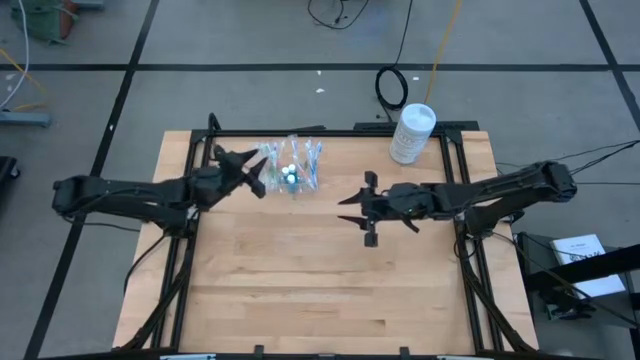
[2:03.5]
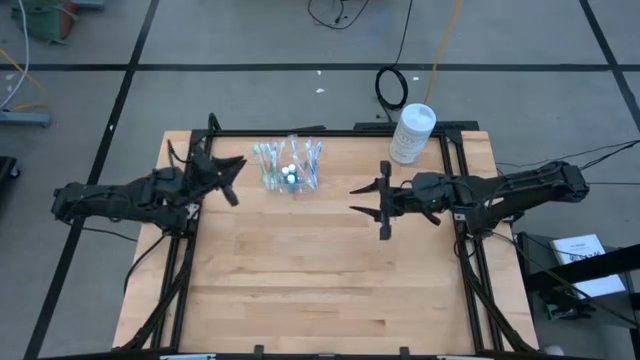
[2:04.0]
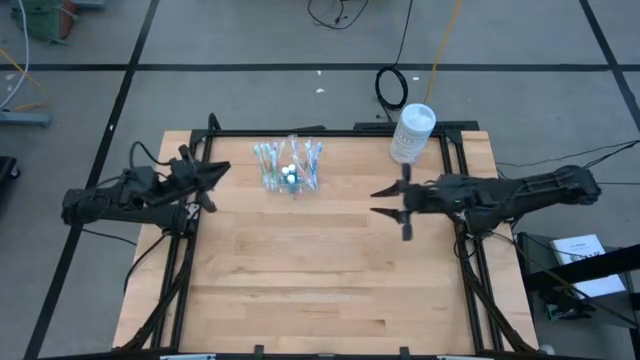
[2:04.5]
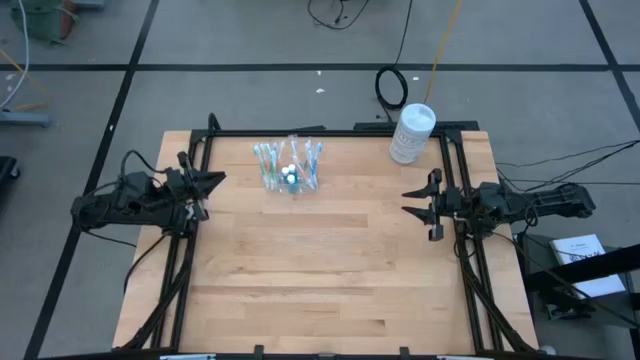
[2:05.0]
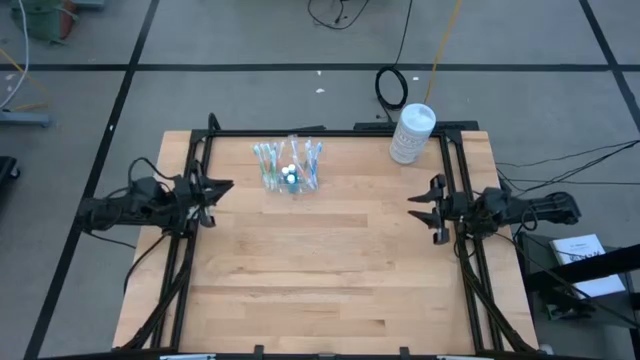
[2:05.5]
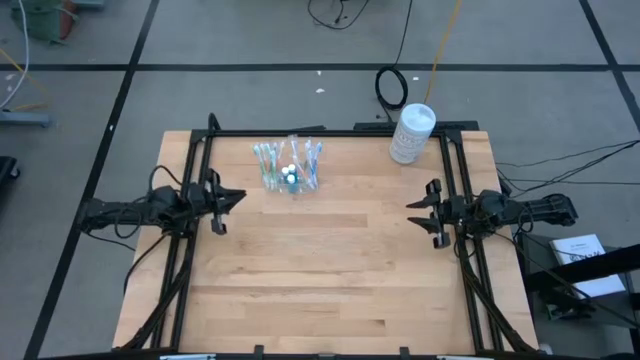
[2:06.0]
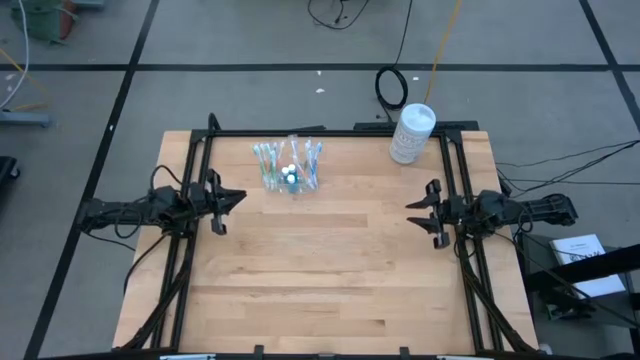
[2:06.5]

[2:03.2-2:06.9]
Task: Pick & Place toothbrushing station
Return to Home Position

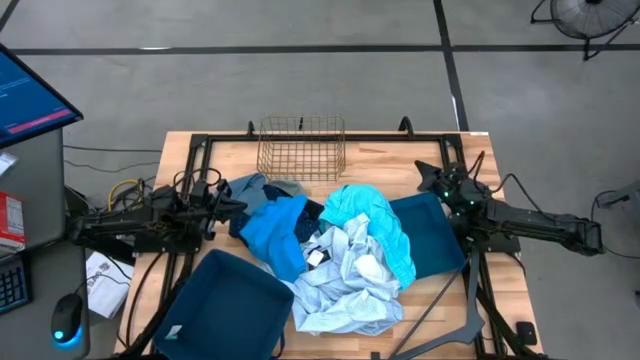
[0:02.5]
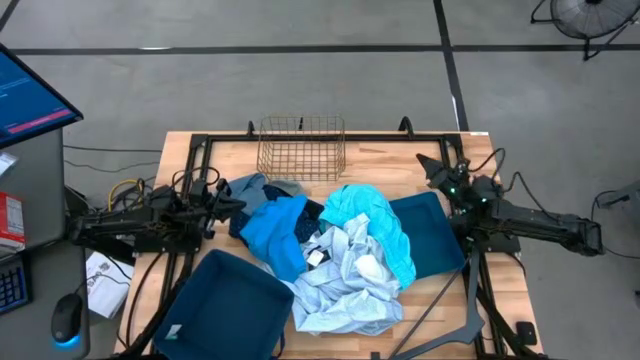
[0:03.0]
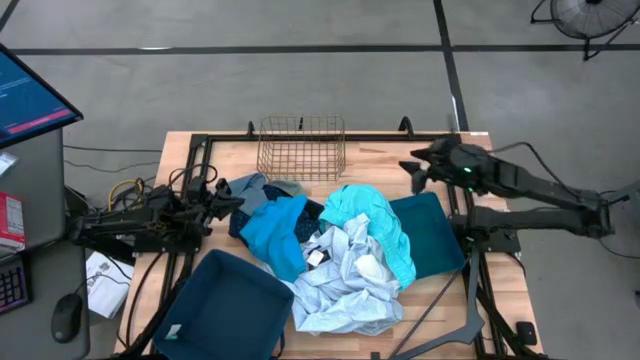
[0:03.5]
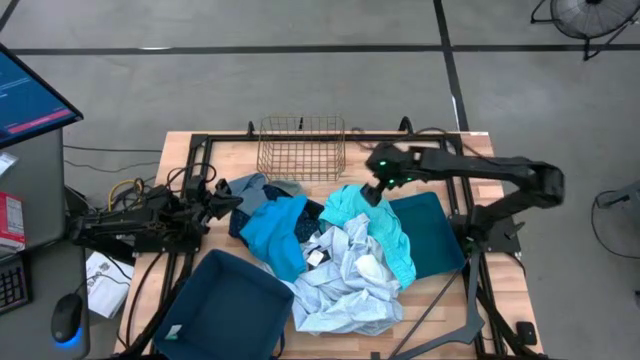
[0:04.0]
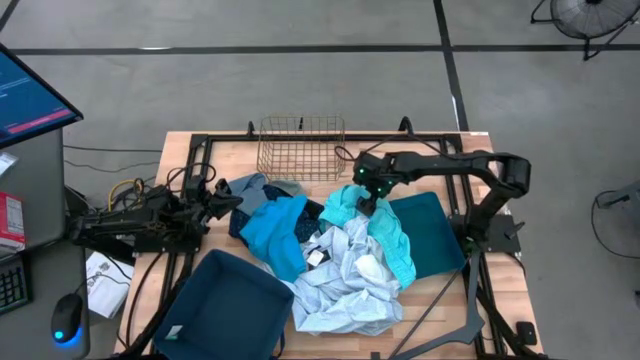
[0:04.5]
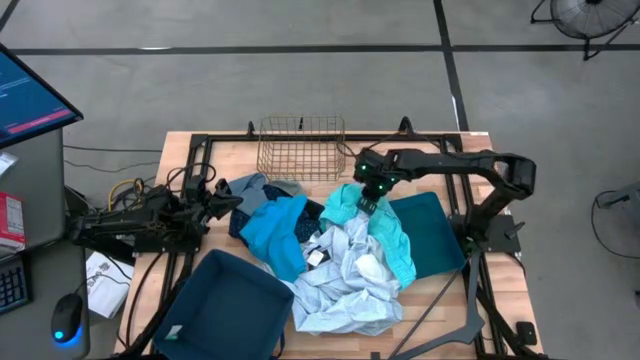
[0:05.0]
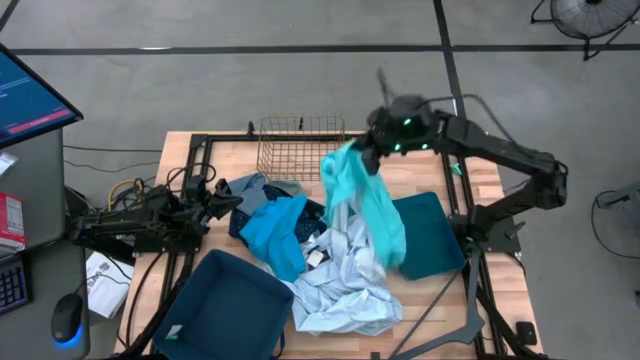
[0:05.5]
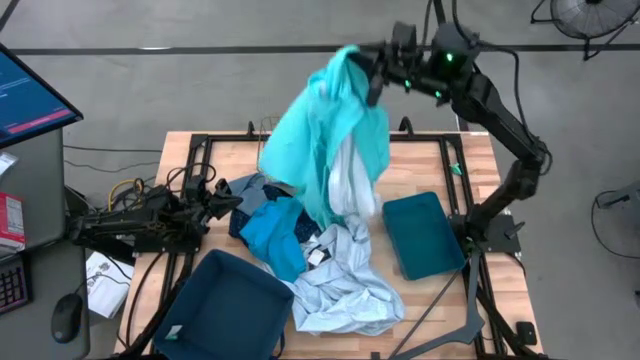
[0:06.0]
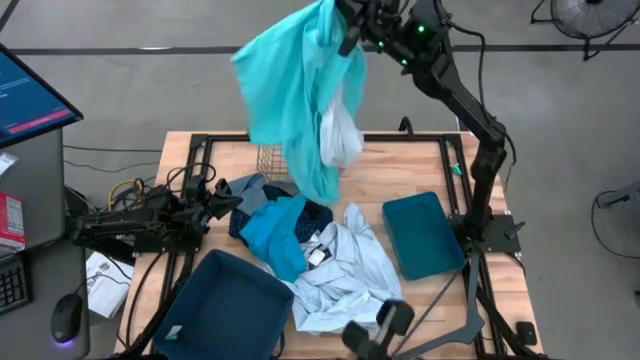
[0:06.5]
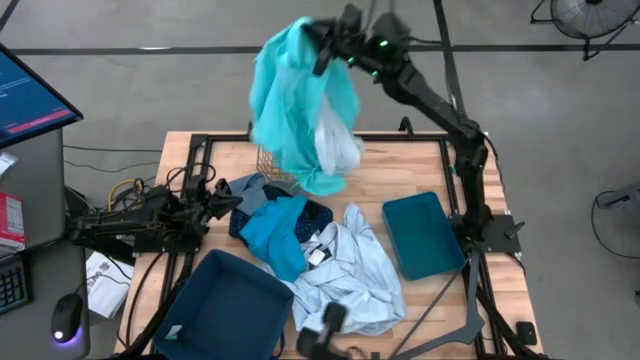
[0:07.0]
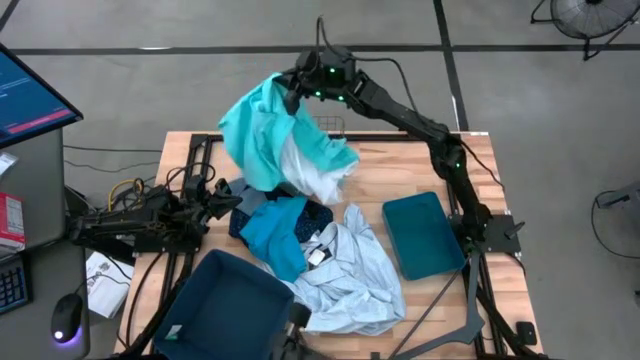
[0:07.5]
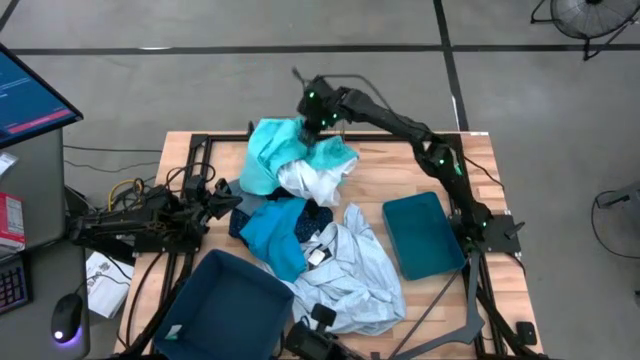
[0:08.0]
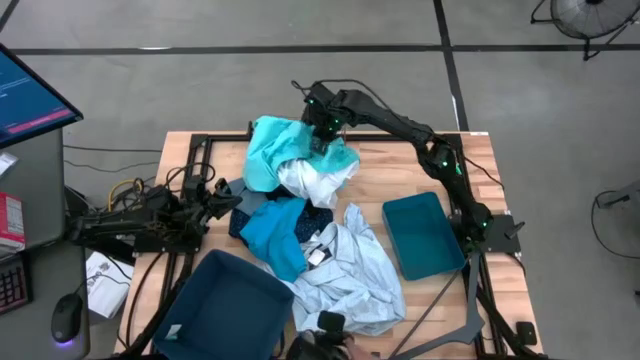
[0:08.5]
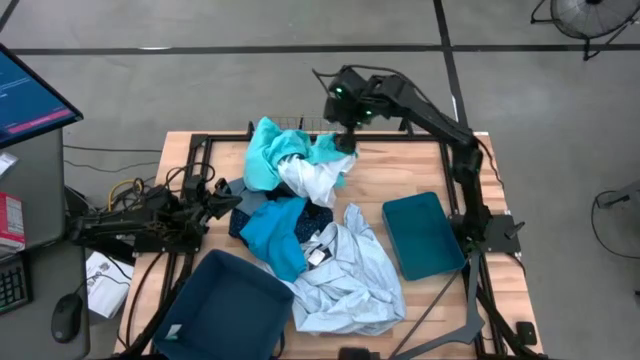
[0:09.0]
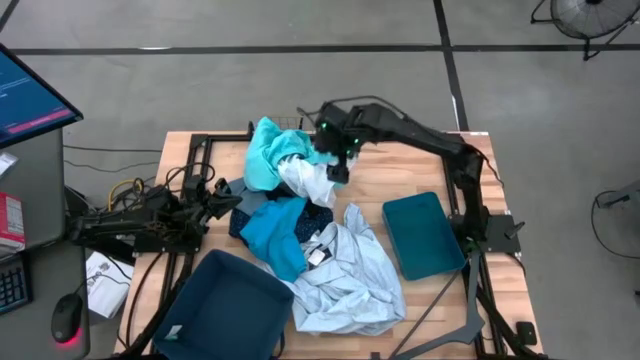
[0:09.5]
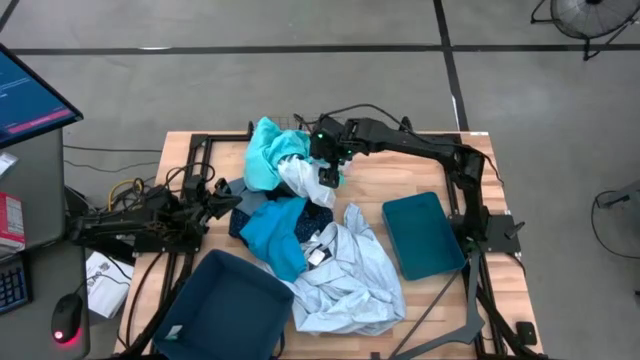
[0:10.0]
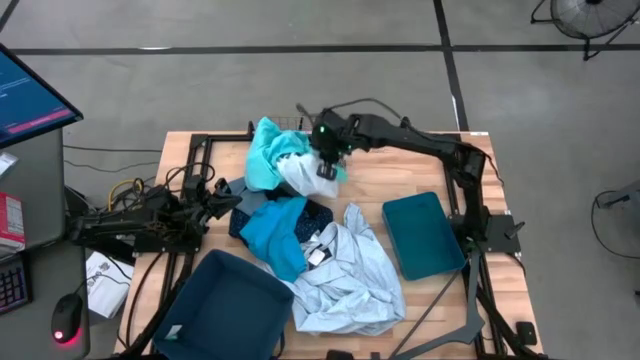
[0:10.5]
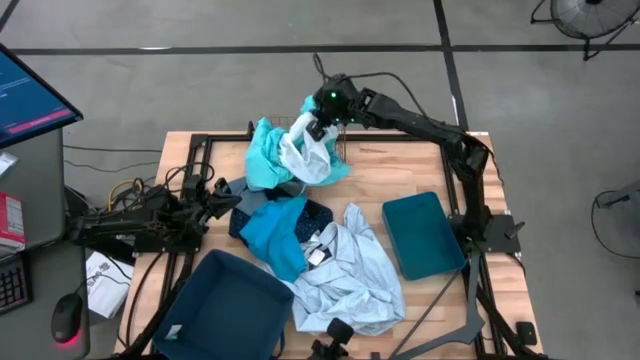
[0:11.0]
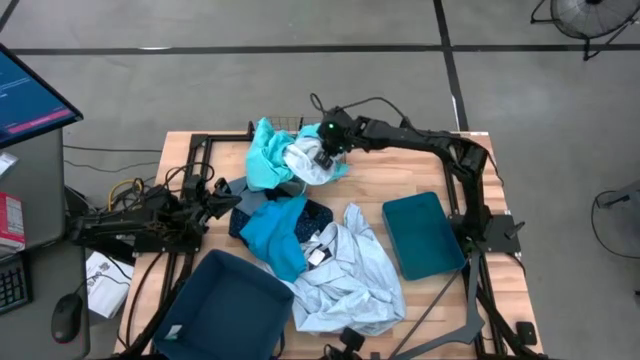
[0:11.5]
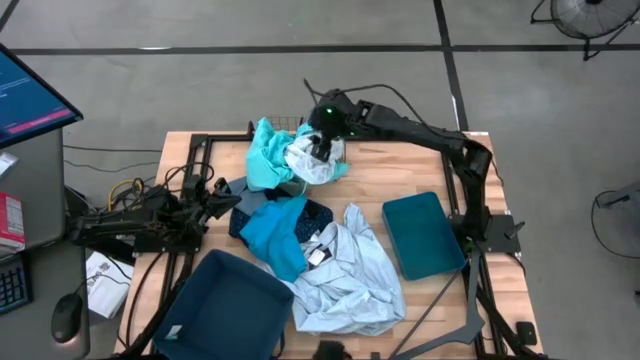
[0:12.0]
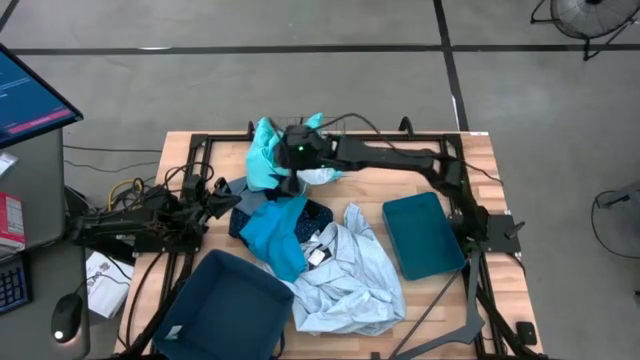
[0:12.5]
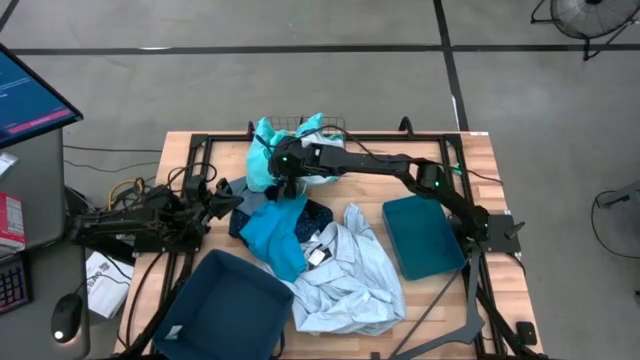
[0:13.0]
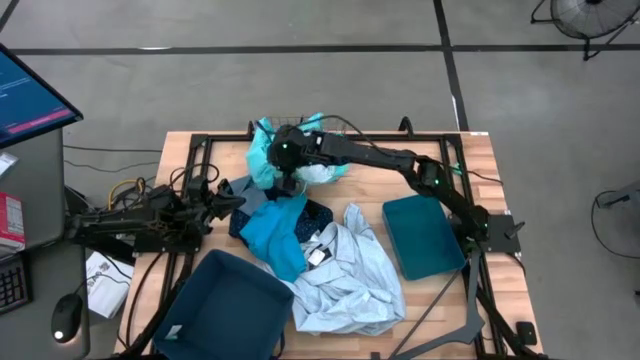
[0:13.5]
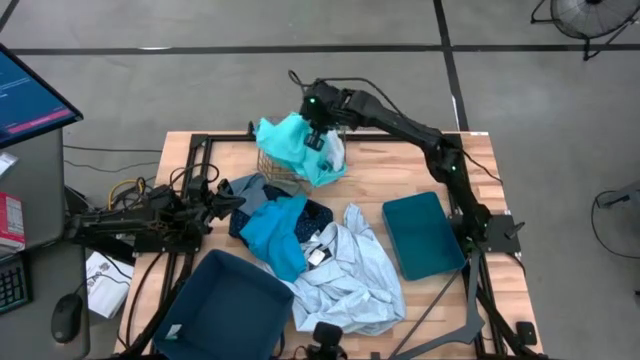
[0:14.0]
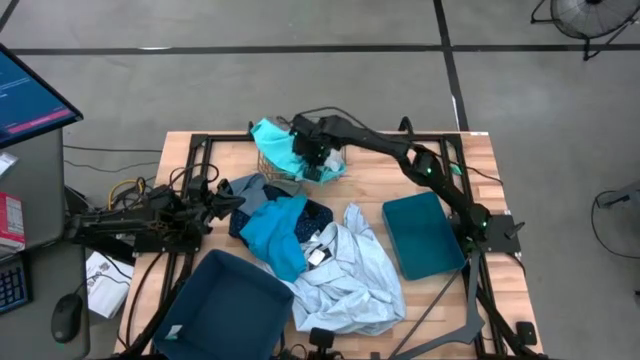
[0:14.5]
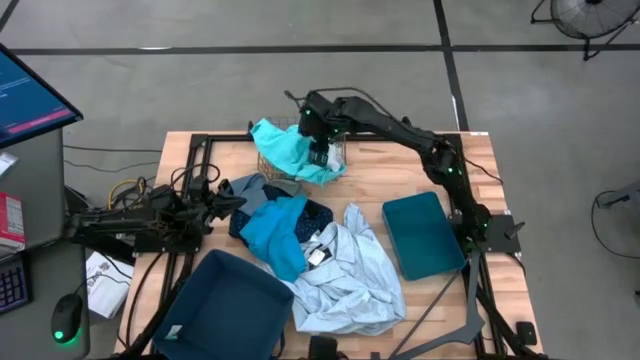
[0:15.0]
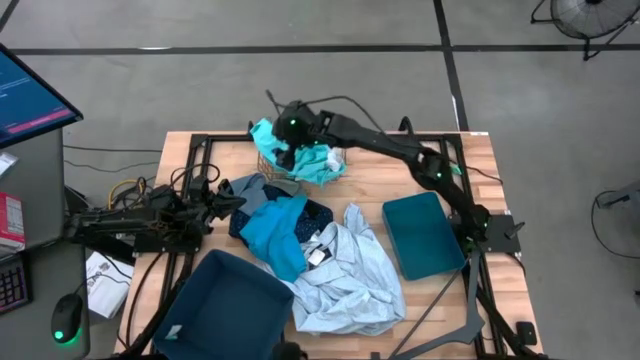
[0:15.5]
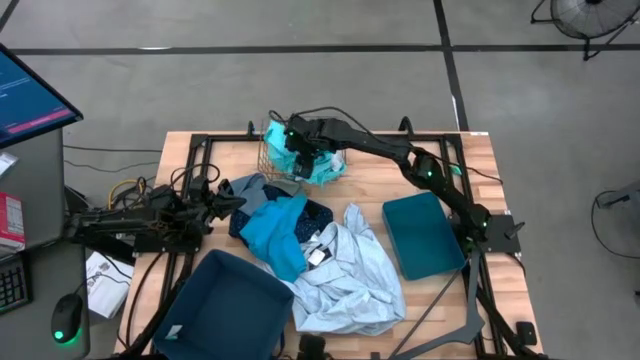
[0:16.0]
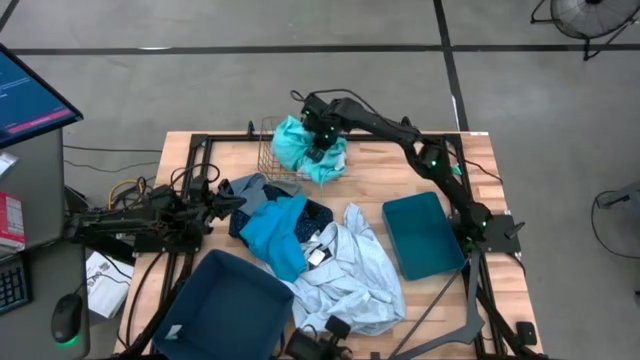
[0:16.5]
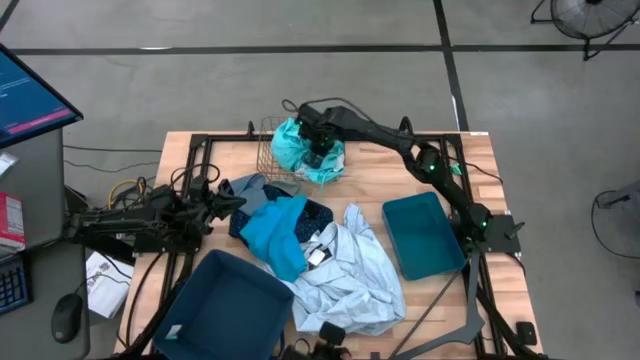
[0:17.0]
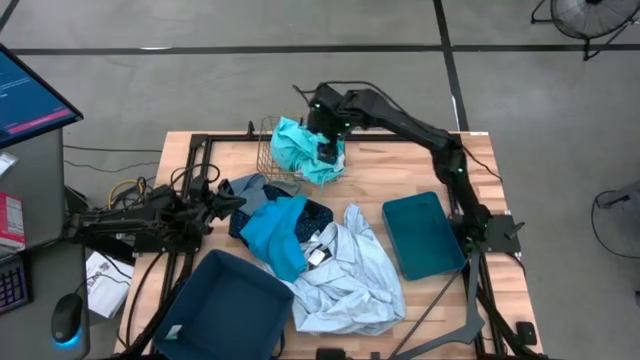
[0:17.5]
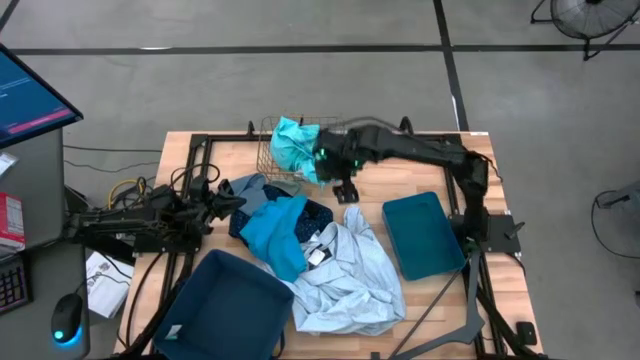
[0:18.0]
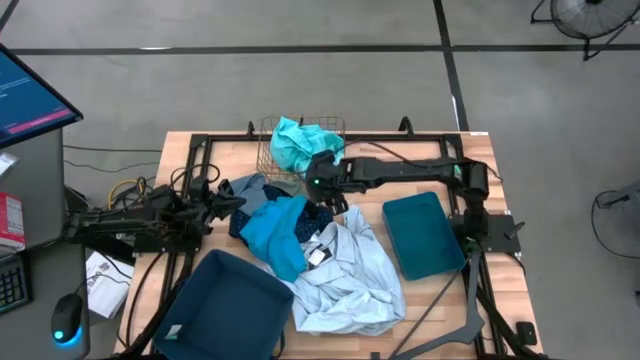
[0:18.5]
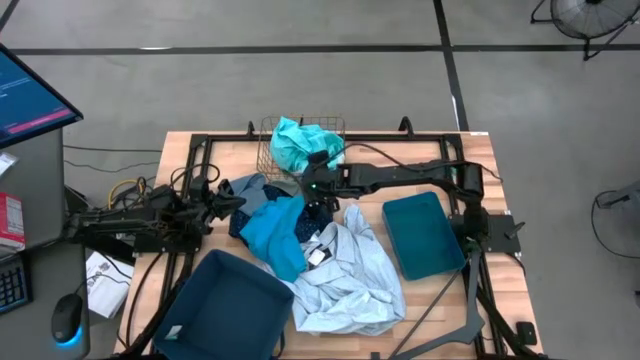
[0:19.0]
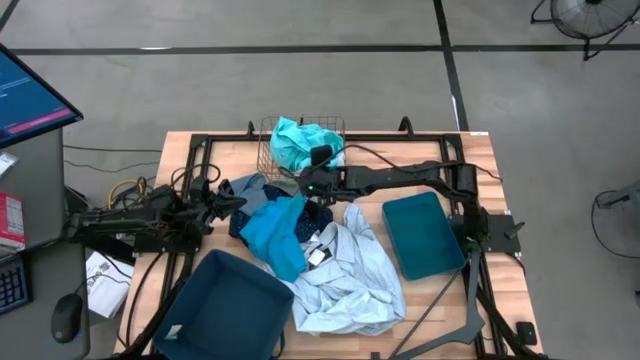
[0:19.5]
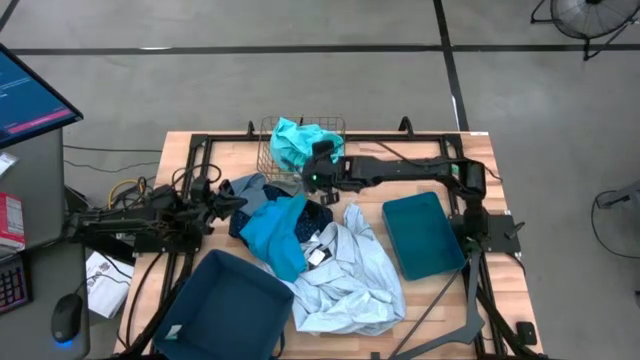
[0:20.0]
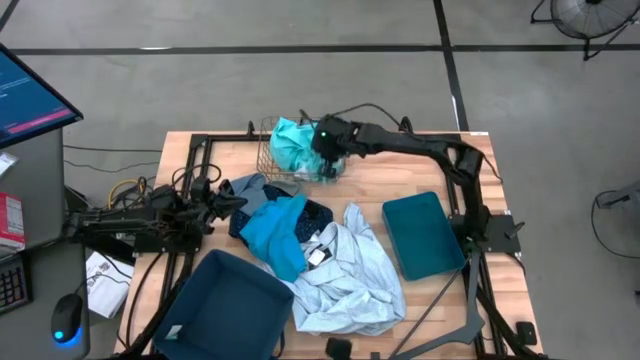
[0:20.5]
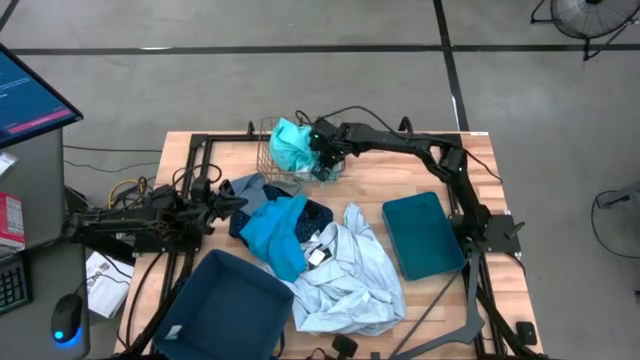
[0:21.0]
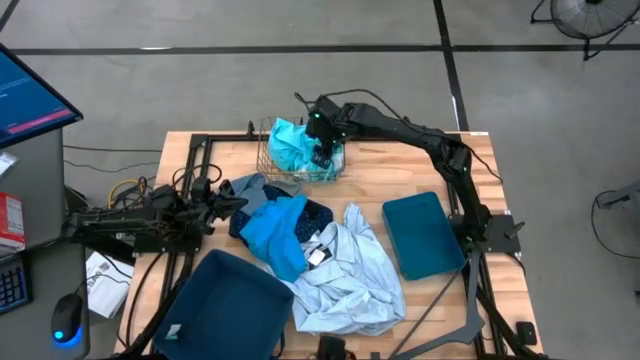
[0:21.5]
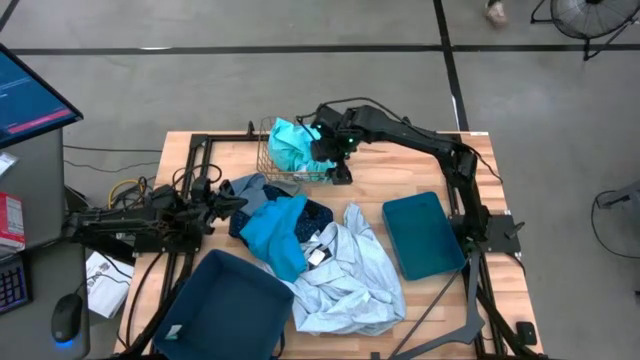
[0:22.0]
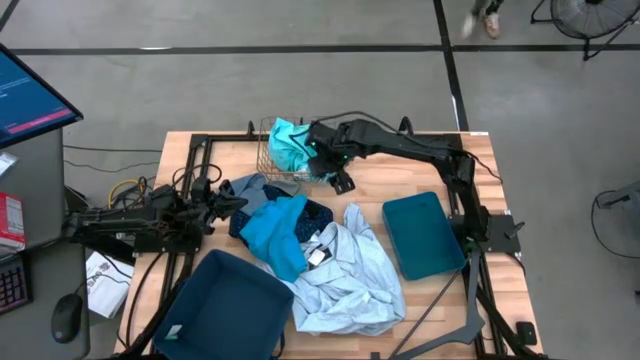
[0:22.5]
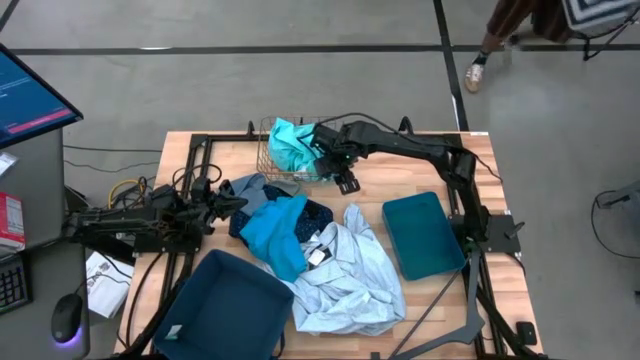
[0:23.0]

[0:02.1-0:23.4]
Task: Pick & Place Cloths
Put the light blue short pants into the gold wire basket
